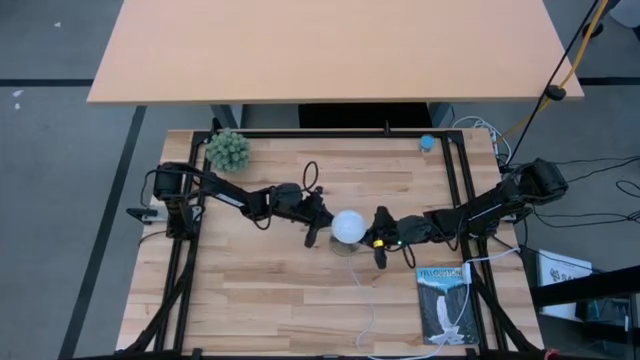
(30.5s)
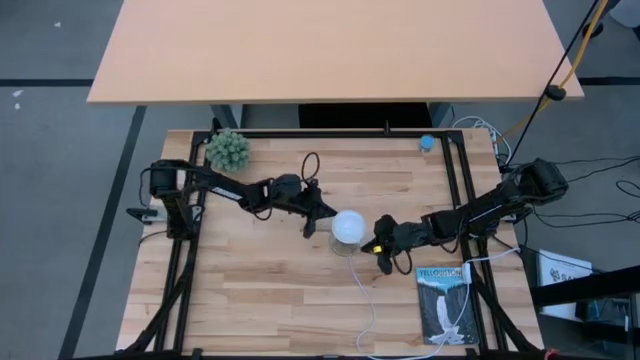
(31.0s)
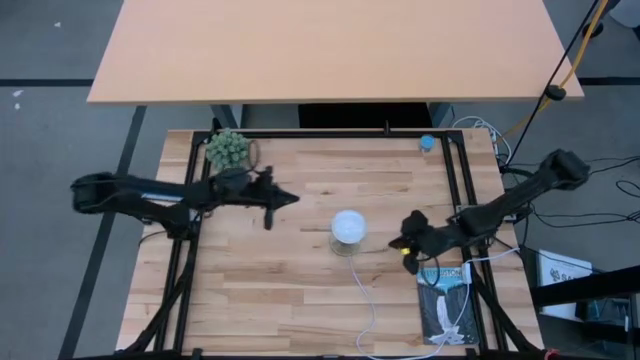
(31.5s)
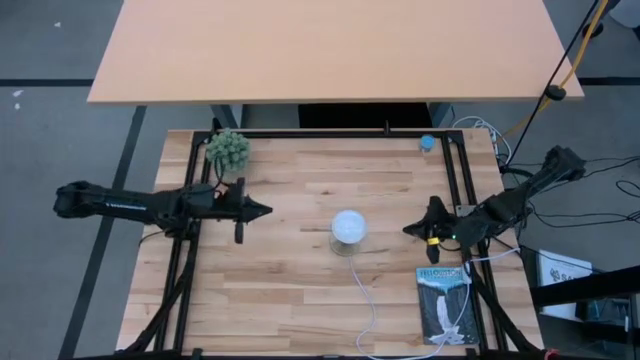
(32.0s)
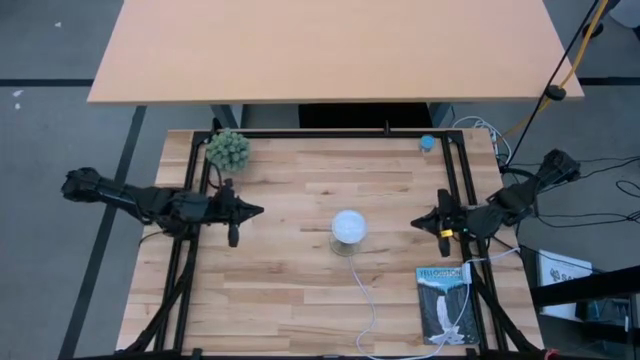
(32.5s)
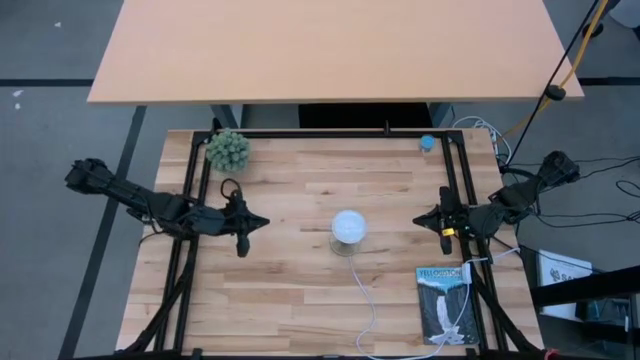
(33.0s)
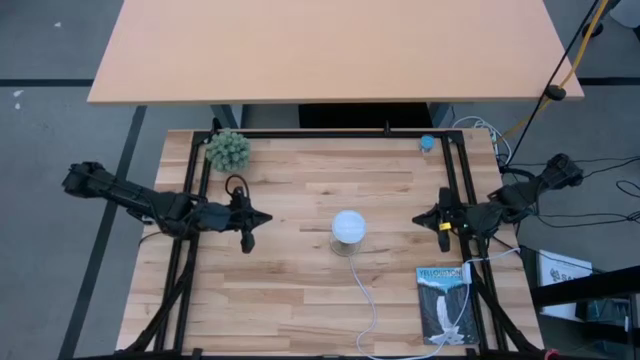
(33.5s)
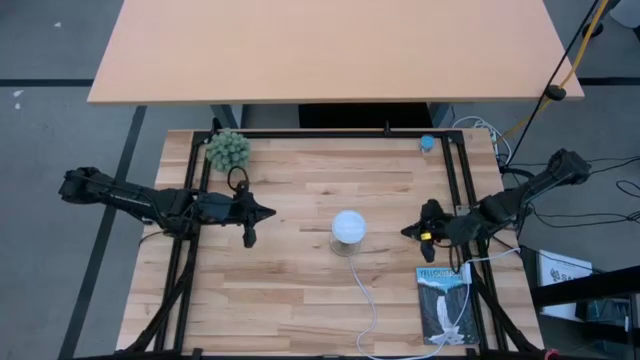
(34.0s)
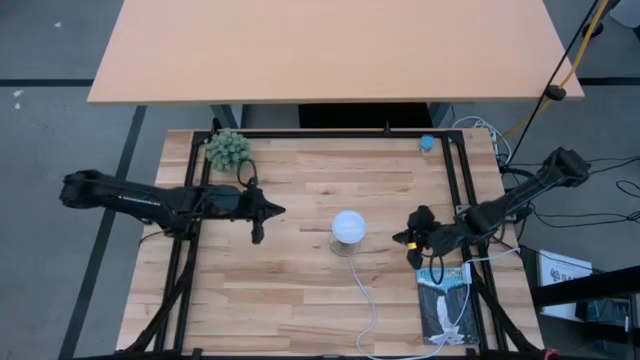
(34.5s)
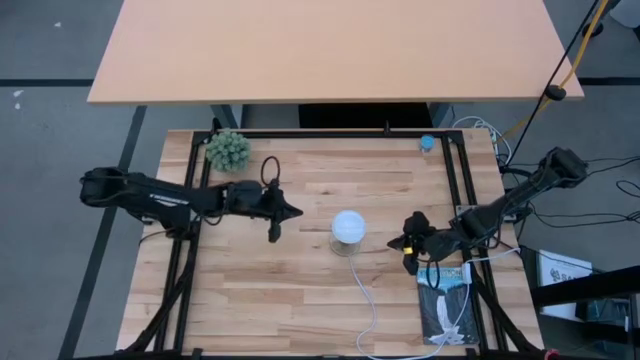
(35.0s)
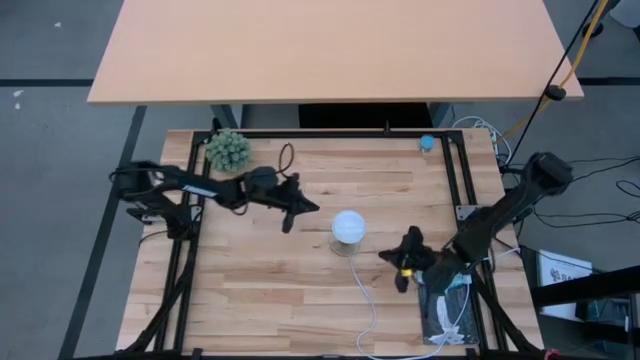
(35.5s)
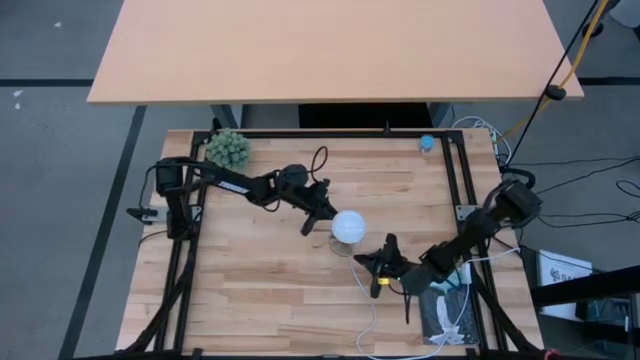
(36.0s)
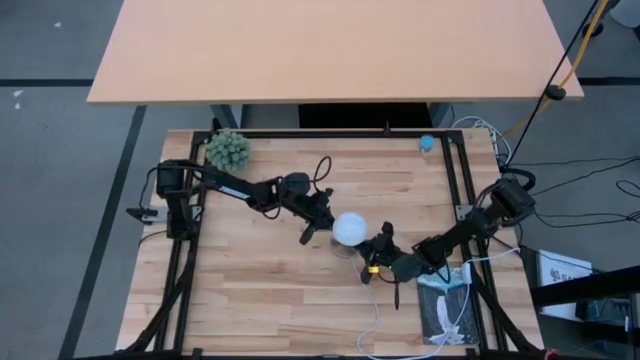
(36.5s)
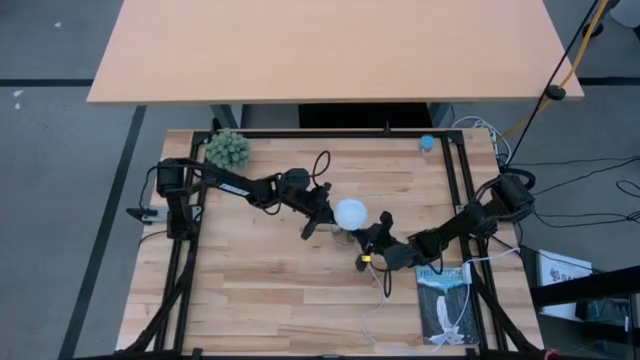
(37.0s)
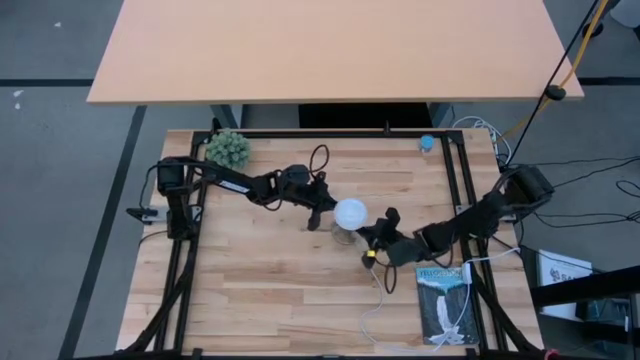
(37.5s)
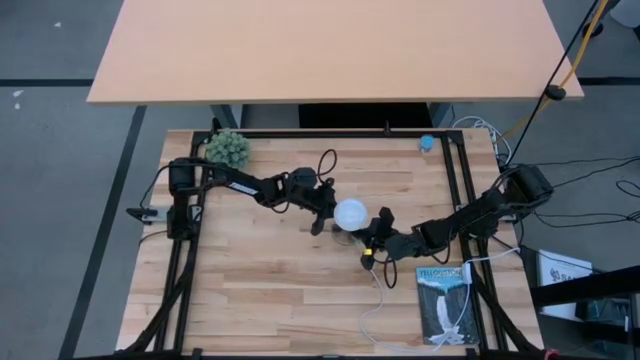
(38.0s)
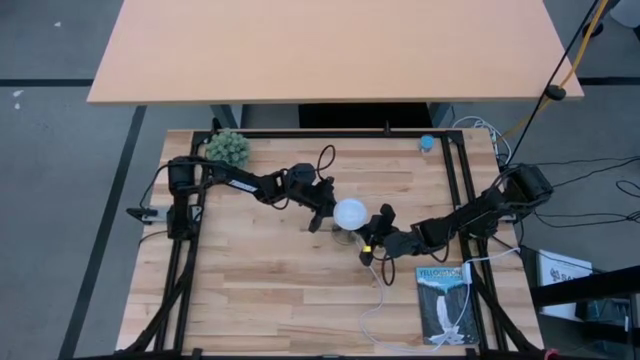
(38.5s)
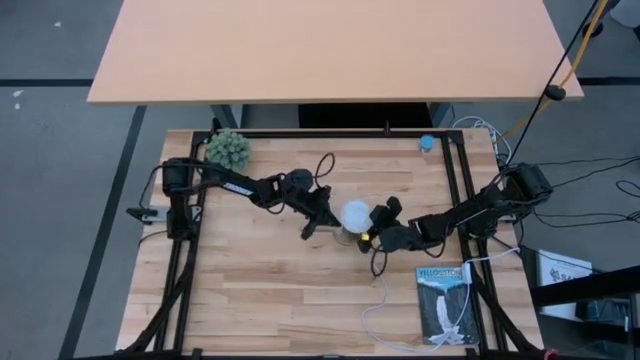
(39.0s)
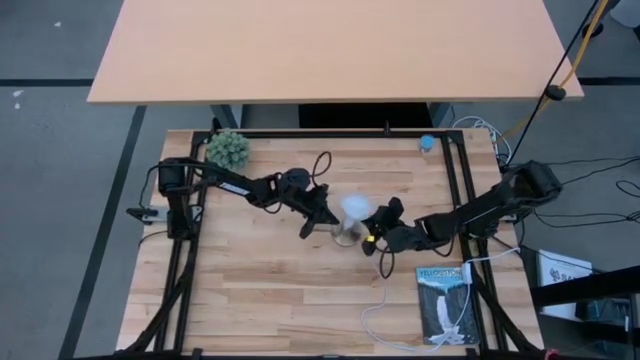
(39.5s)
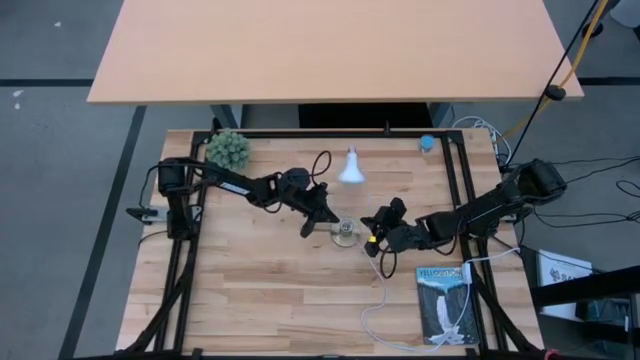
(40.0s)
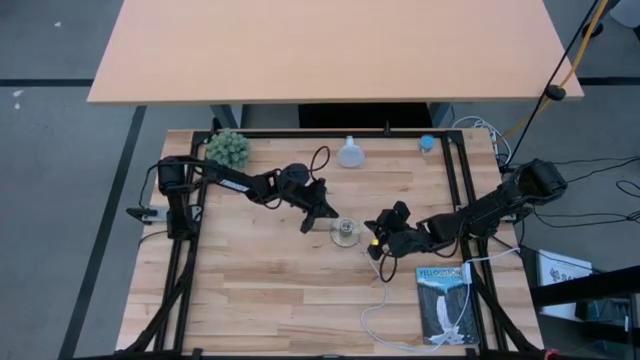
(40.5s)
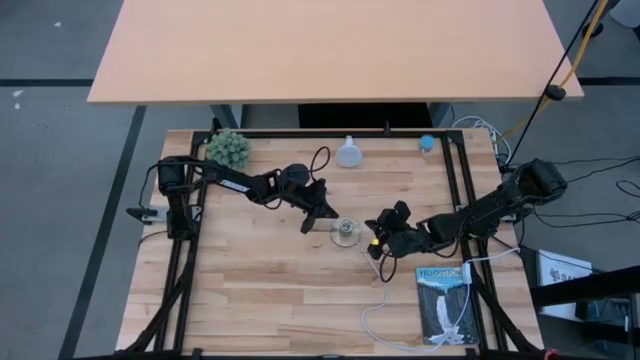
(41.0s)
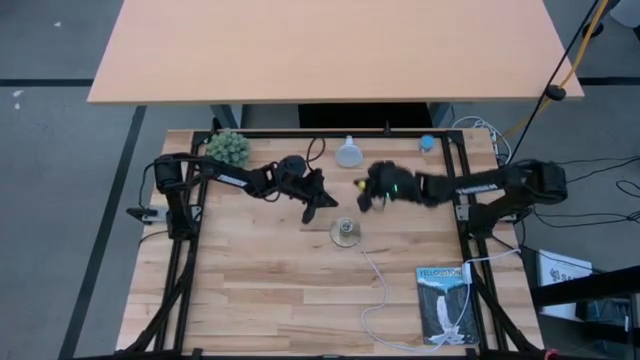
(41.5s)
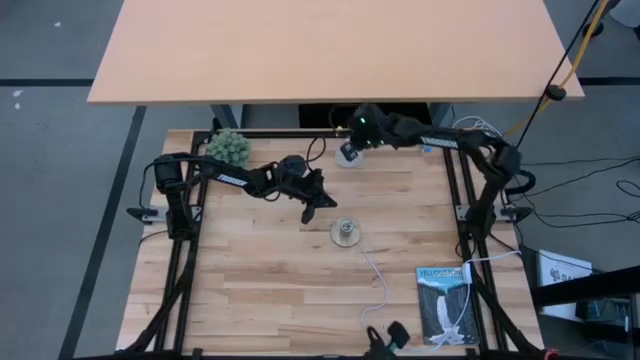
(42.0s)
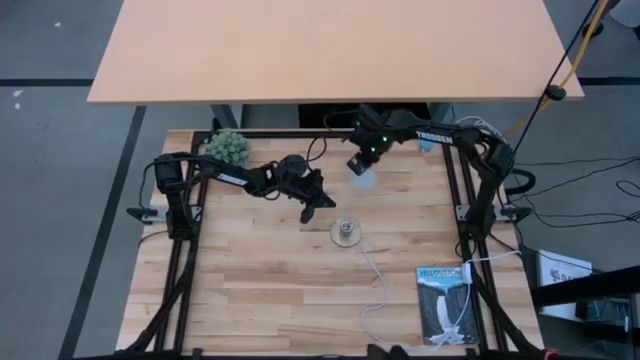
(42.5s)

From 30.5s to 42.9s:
Task: Screw lightbulb
Remove the light bulb from the lamp

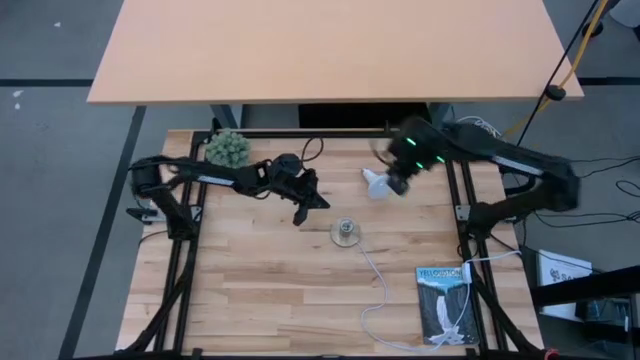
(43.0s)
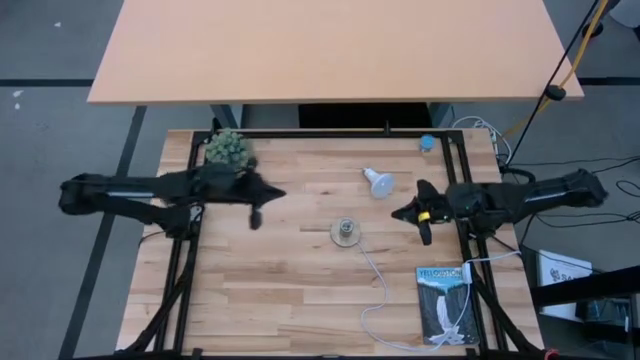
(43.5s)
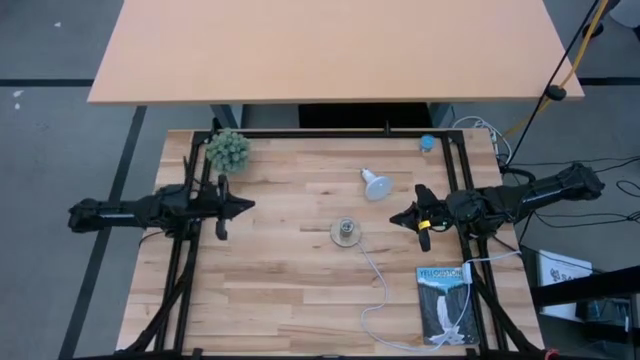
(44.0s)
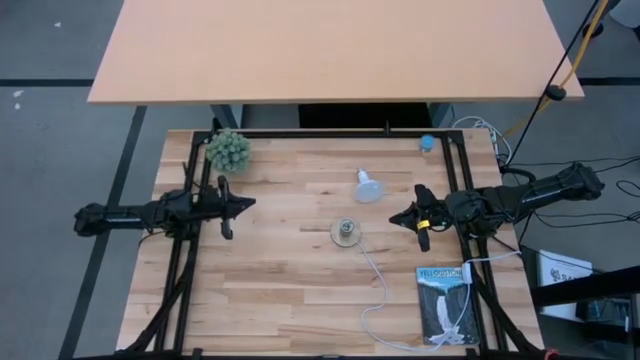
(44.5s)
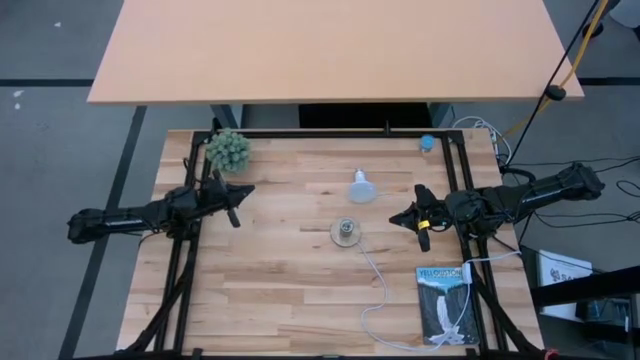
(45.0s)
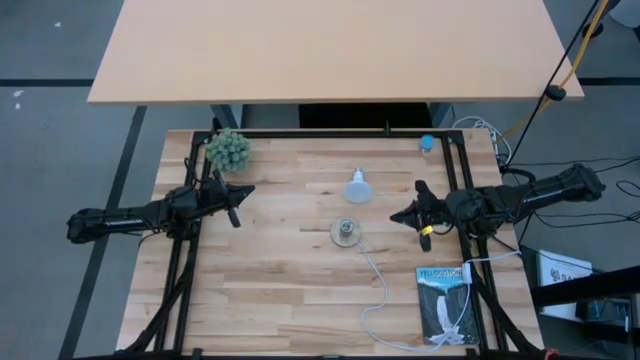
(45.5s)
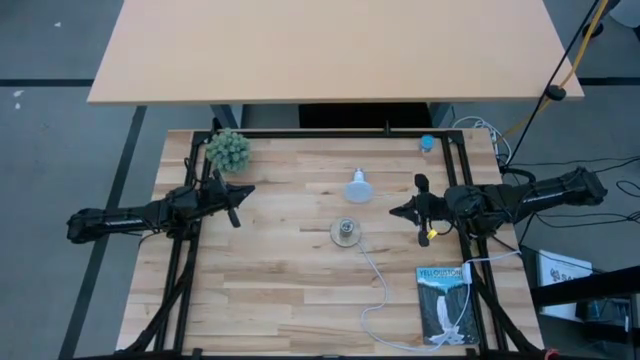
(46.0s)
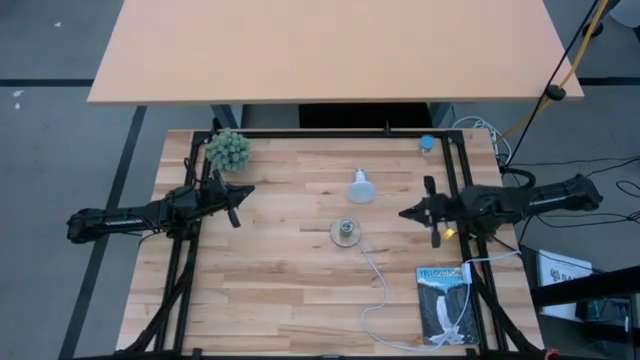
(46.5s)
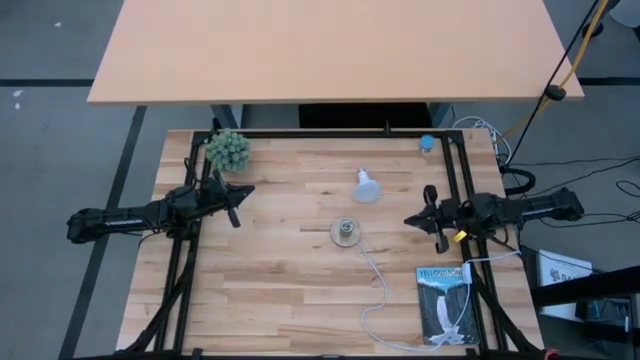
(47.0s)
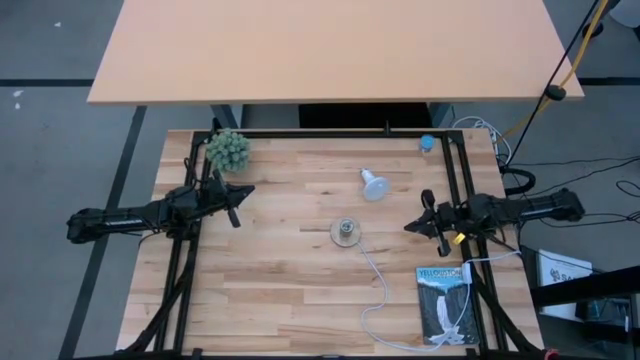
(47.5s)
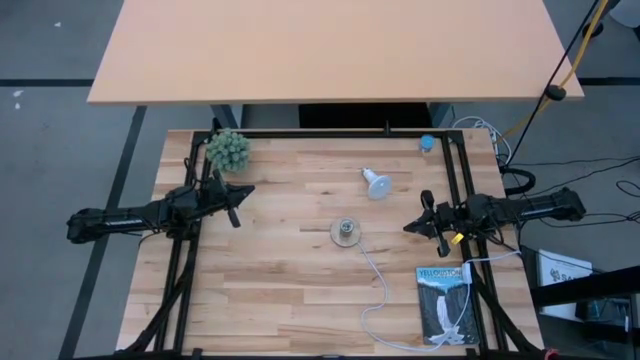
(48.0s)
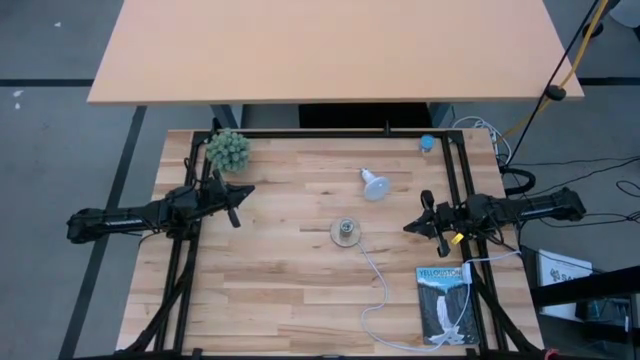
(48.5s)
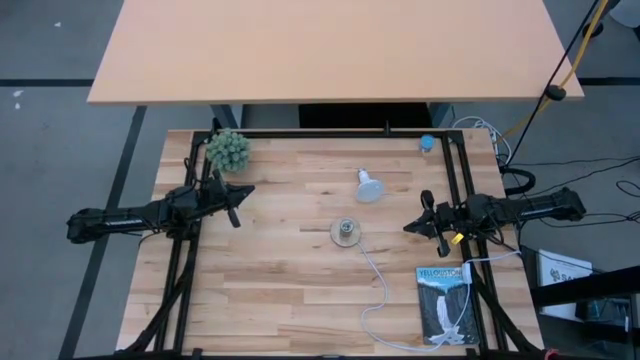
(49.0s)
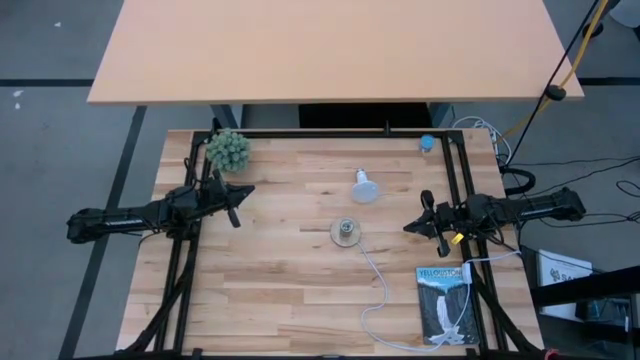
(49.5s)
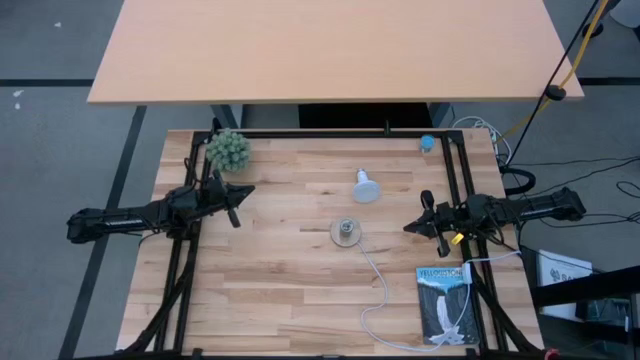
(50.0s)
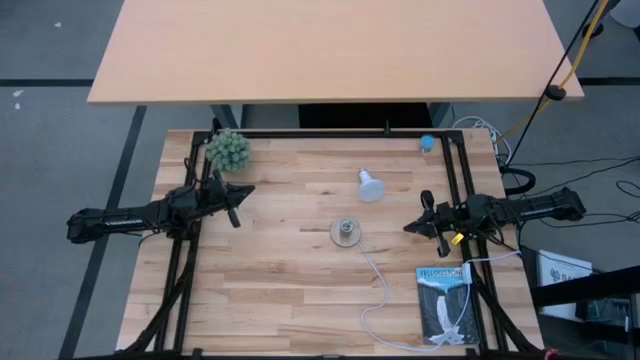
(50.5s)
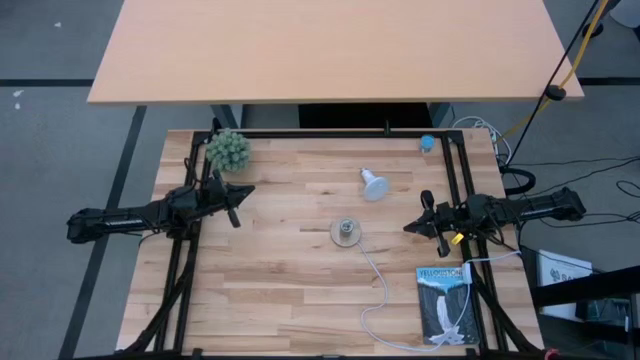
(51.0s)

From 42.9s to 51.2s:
Return to Home Position

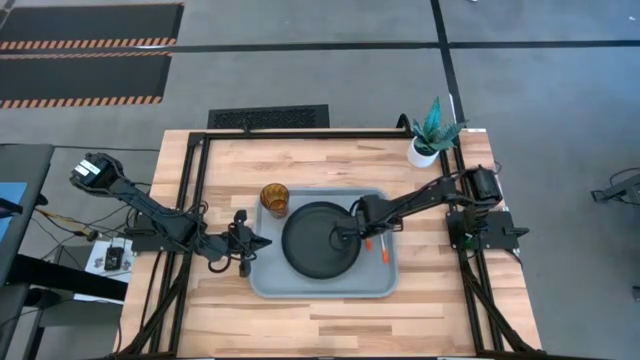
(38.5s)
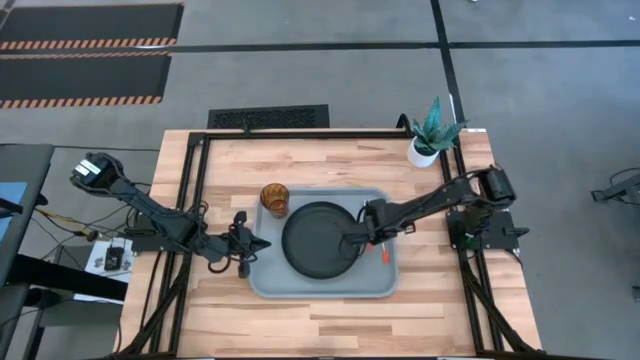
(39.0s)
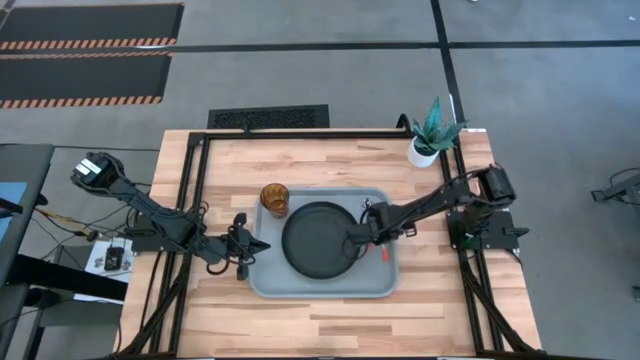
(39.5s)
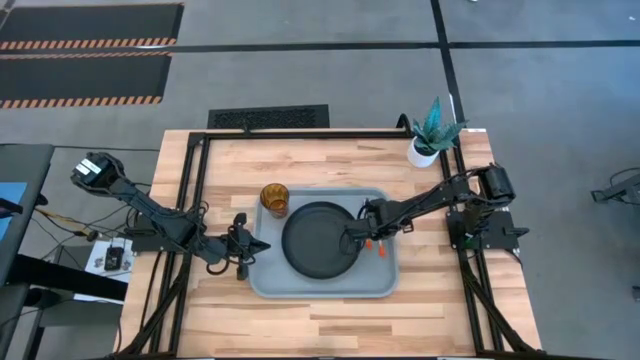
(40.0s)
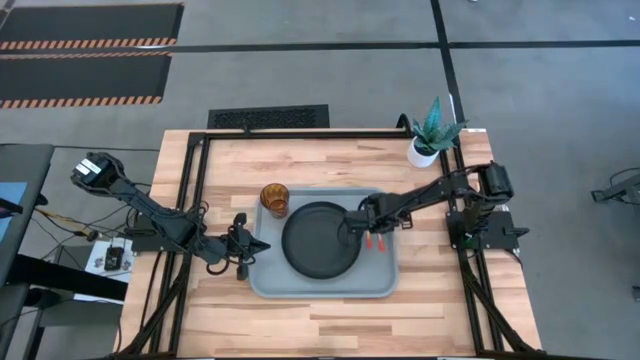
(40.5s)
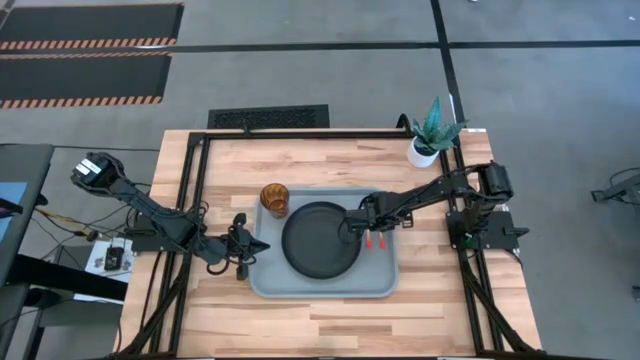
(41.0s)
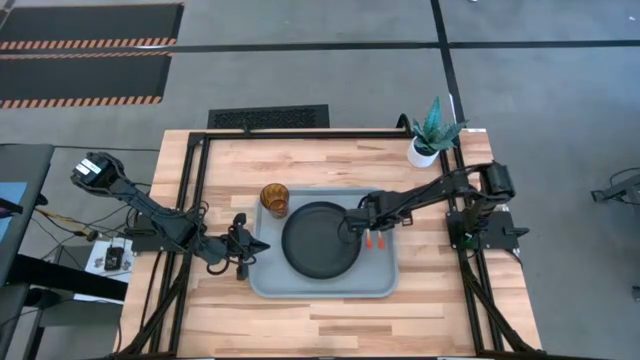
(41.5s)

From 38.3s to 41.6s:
Task: Pick and place plate/cup/fork/spoon on tray
Adjust the orange fork on the gray serving tray
